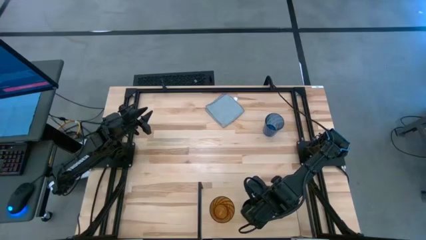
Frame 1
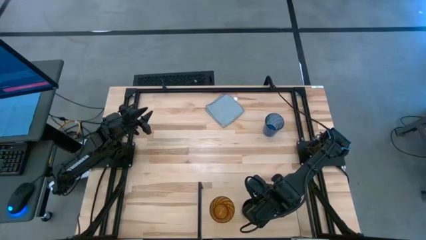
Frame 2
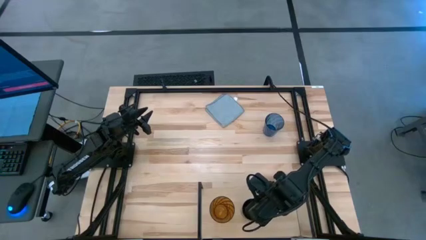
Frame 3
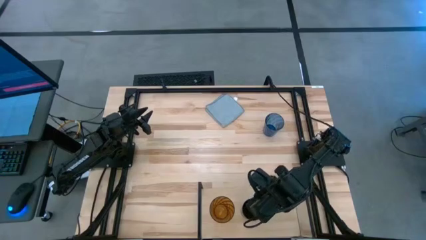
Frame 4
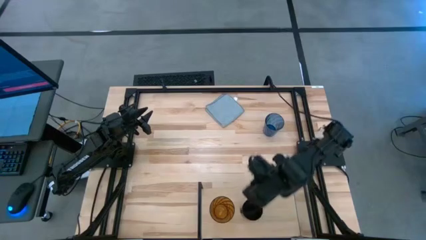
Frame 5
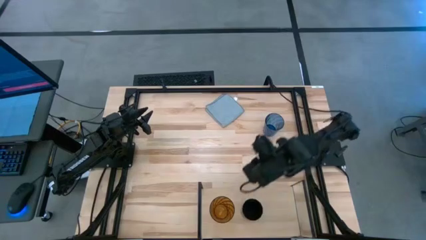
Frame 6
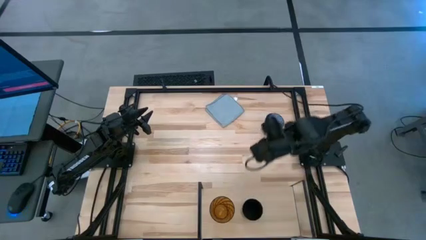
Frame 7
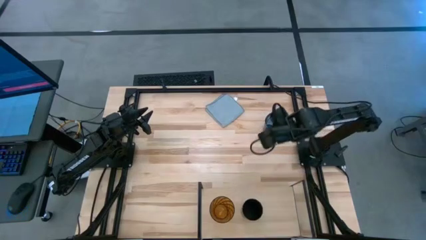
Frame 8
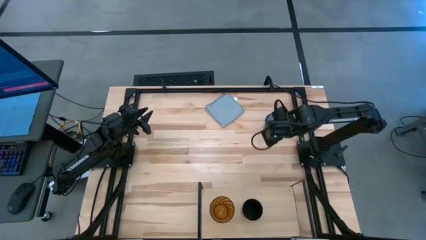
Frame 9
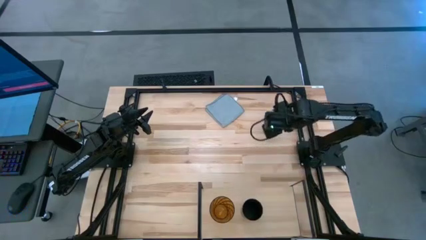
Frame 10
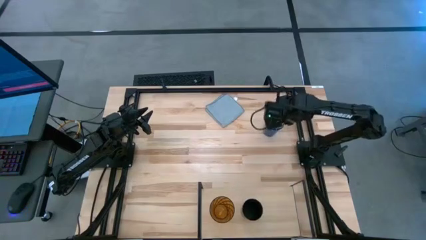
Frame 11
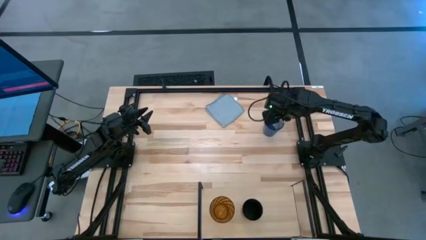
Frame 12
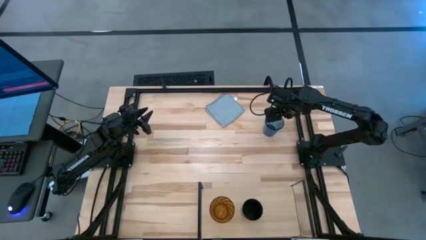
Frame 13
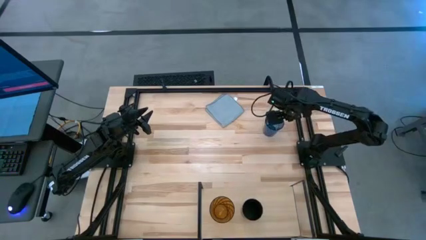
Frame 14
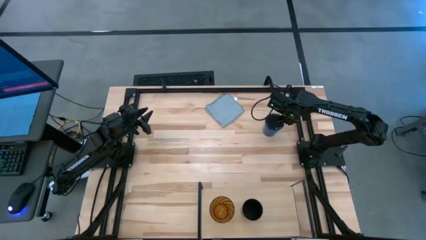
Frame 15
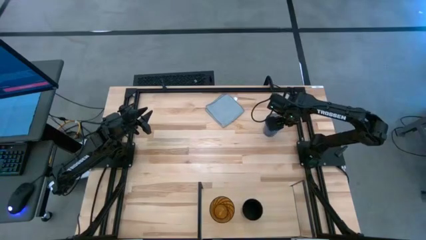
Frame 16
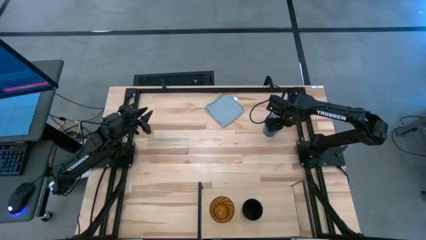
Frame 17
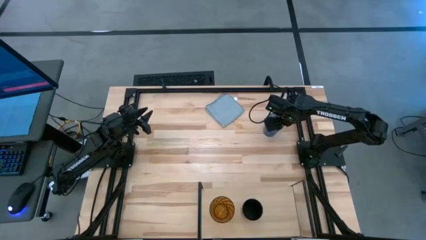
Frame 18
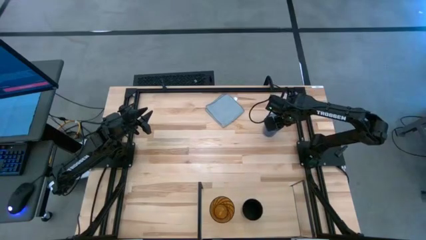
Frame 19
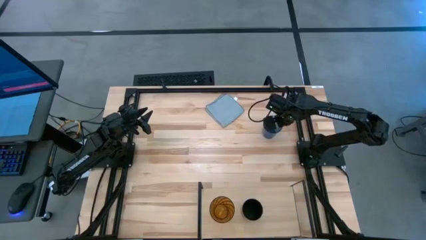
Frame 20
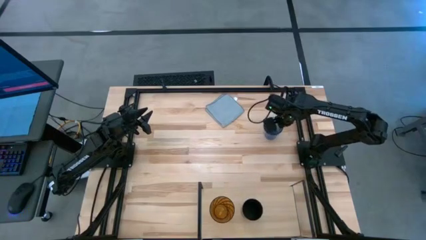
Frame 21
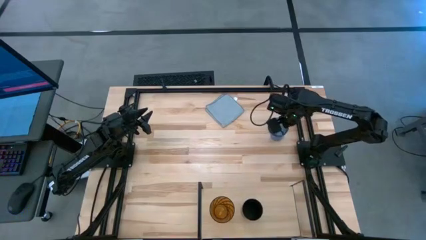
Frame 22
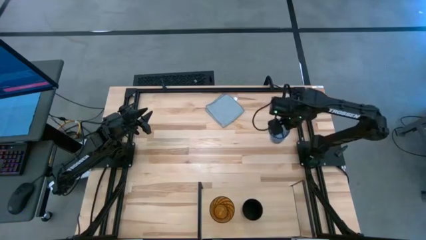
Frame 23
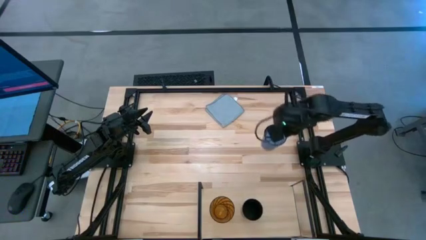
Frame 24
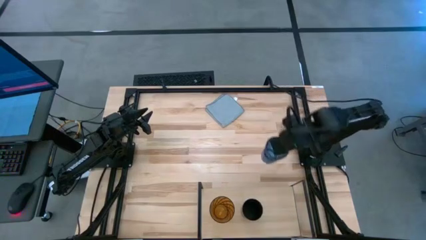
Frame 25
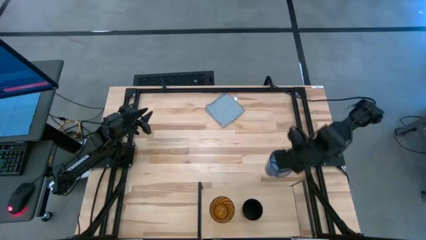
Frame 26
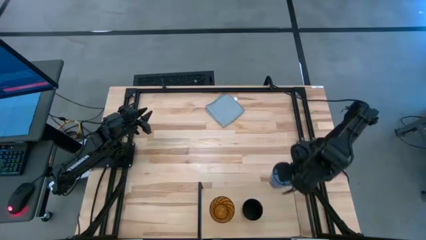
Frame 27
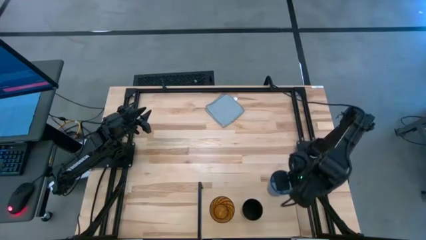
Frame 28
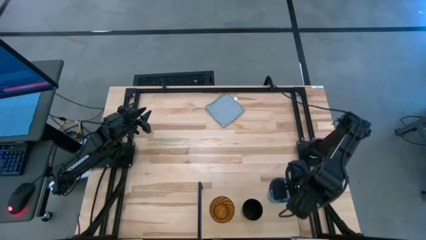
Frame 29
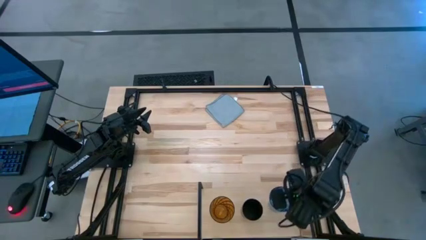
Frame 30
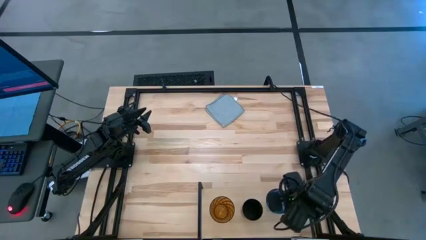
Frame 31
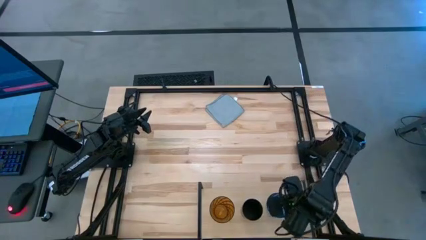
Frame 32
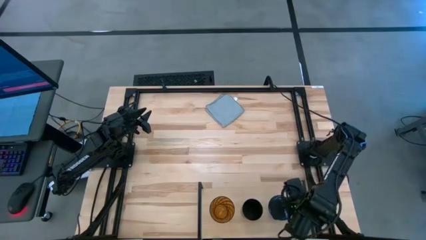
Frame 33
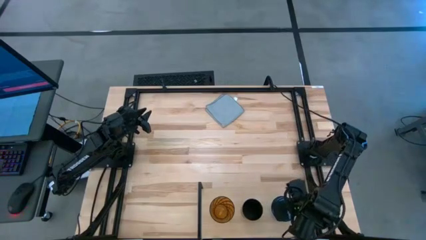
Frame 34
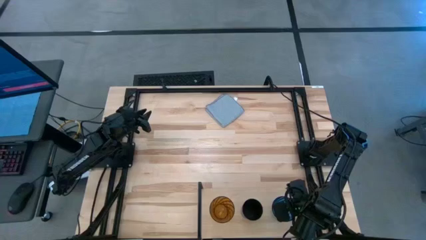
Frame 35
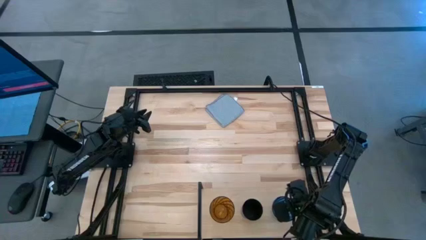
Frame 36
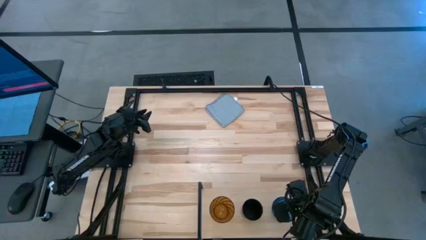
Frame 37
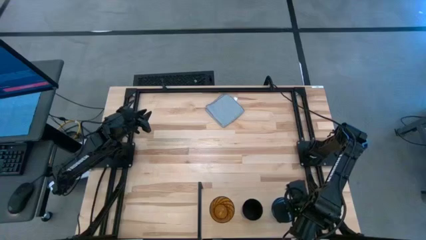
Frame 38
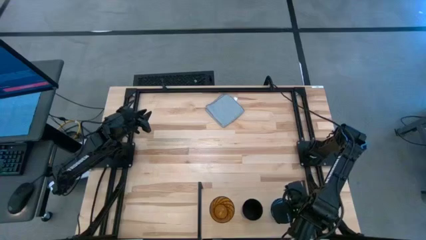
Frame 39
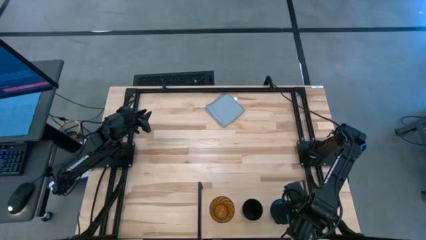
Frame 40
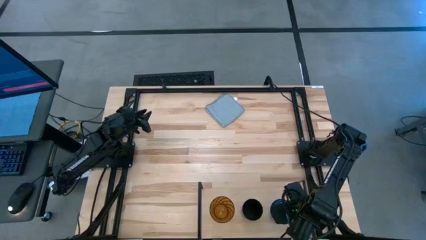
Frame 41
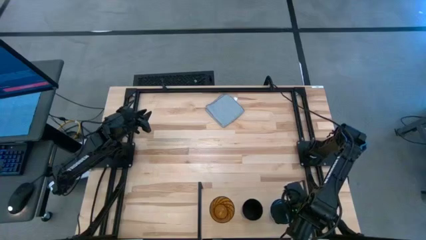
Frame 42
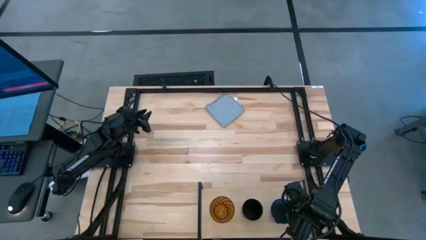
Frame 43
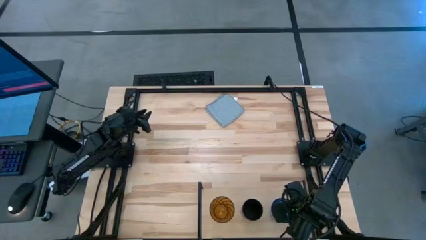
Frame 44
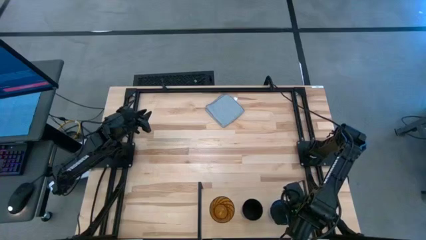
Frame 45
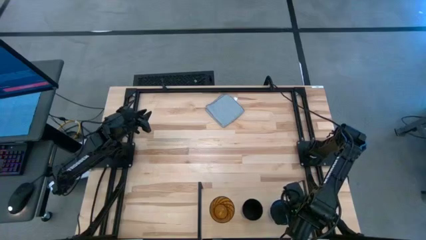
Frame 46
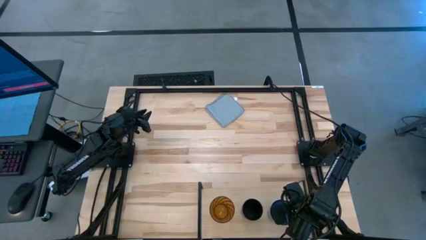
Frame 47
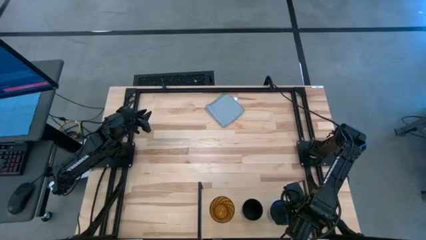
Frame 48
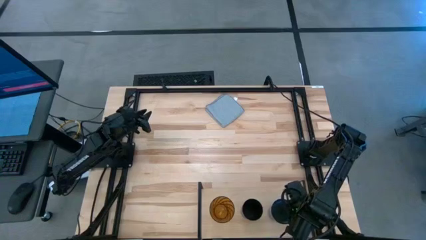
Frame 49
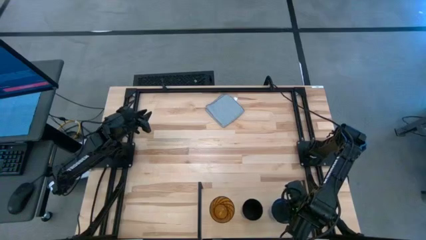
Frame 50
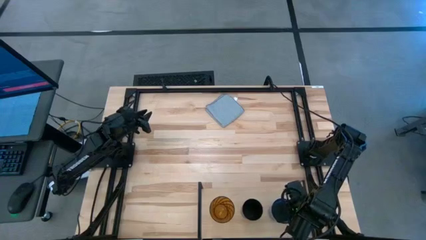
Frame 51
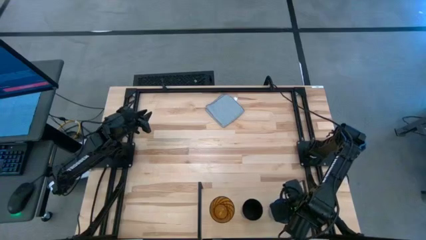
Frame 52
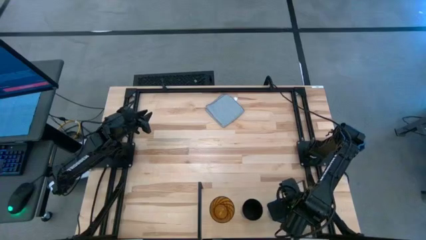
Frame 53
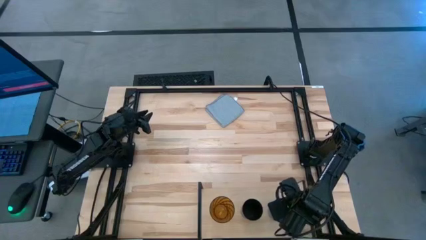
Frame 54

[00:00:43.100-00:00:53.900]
Task: Stack small to large cups/mugs on shelf
Put the blue cup on the shelf

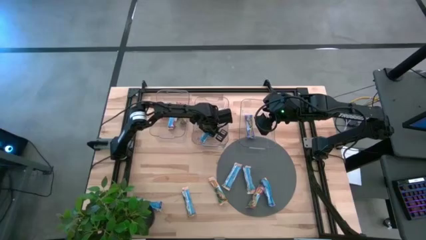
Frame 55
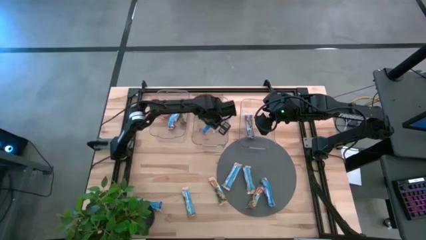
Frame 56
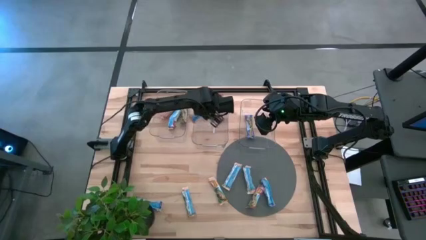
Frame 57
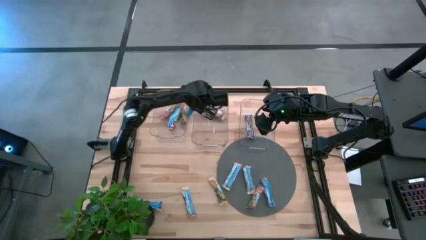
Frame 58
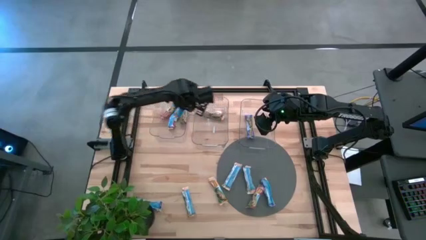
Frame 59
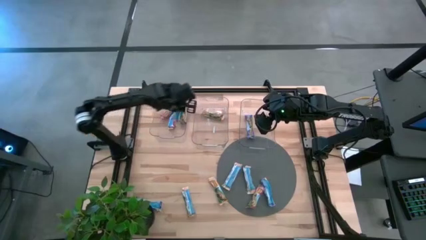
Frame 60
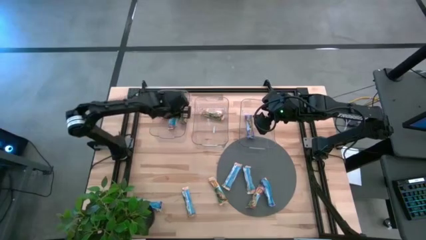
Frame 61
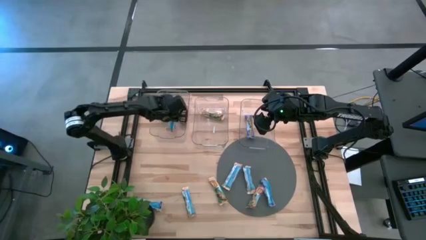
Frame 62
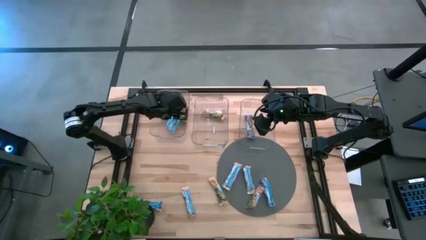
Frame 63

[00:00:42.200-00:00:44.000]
Task: Pick and place Granola Bars by type
Put the red snack bar into the left transparent bin

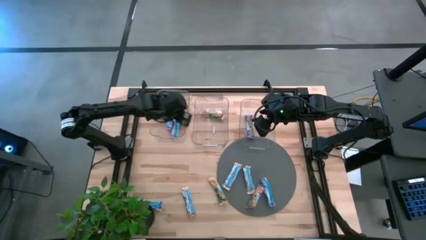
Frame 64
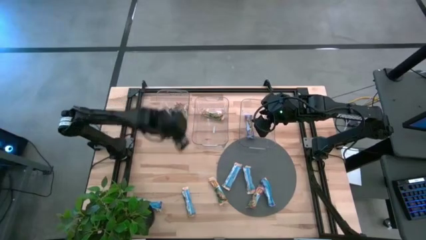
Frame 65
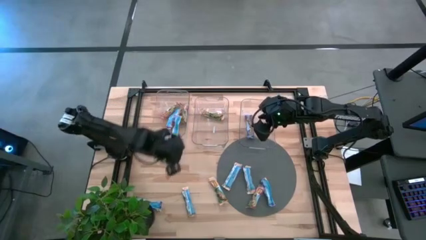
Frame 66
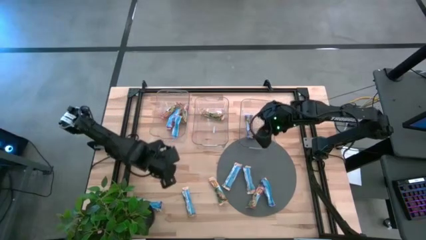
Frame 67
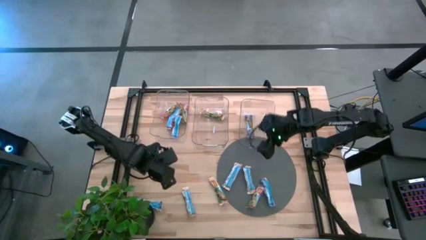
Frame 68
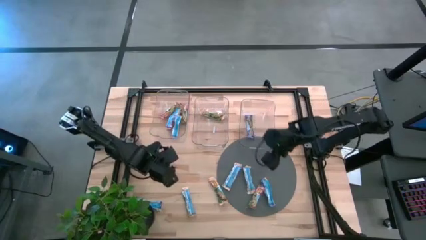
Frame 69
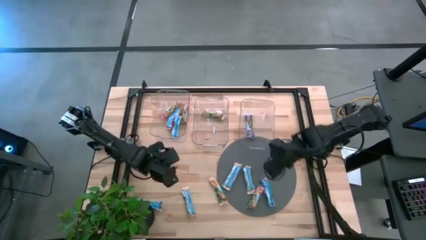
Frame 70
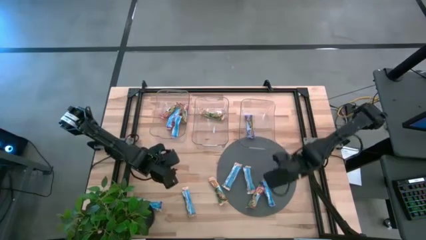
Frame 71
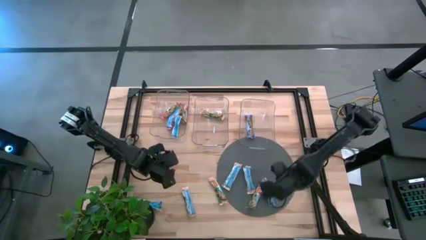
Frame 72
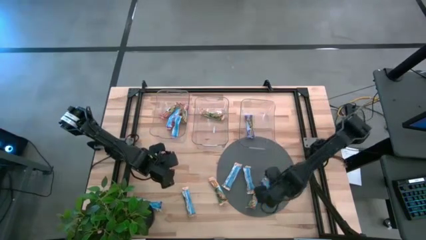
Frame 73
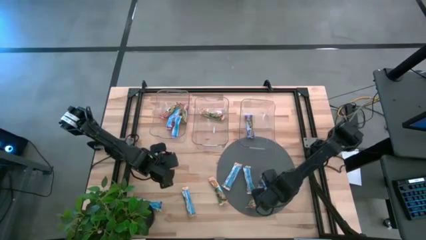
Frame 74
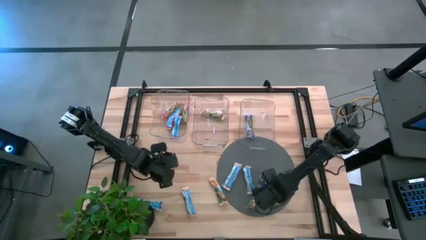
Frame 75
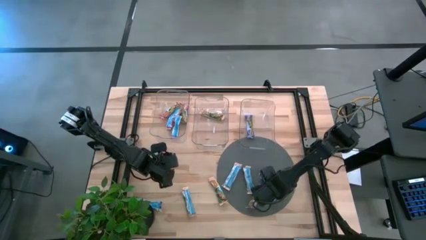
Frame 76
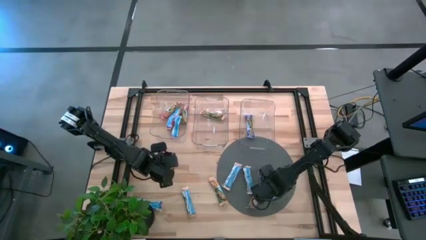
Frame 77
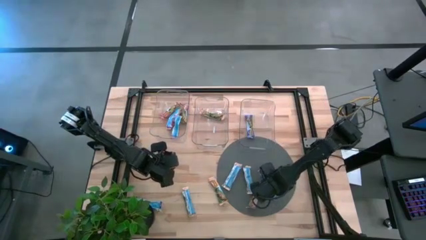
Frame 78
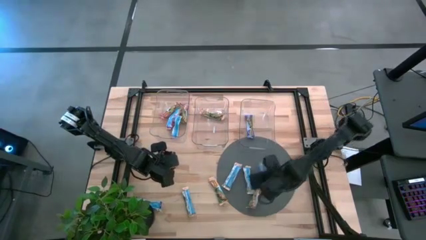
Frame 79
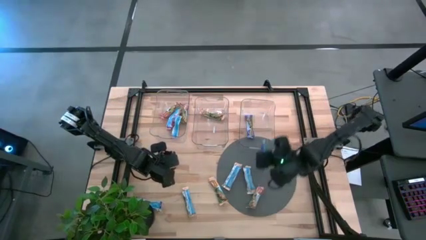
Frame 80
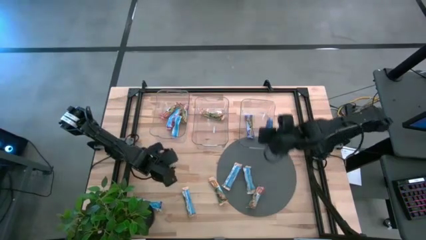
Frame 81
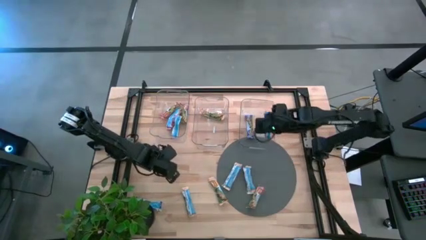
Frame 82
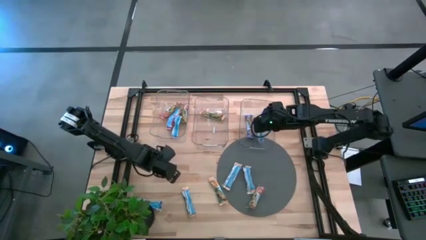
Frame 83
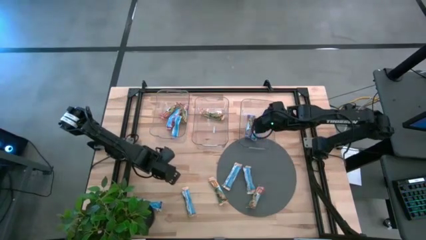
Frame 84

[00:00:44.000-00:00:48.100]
Put the blue snack bar into the right transparent bin
